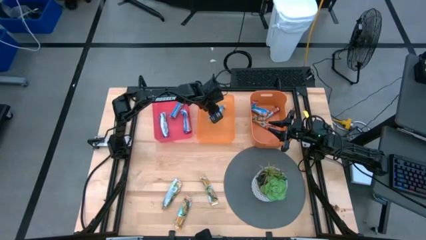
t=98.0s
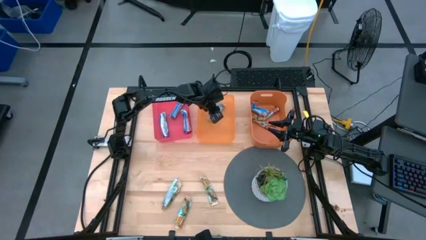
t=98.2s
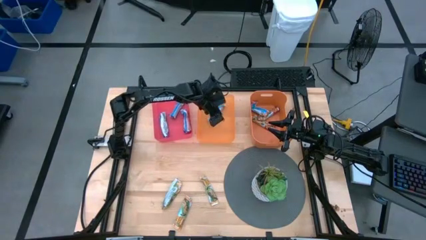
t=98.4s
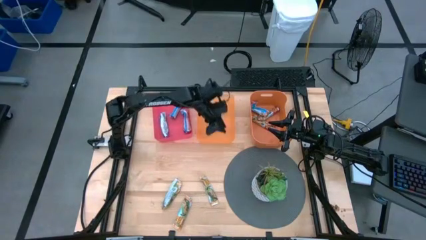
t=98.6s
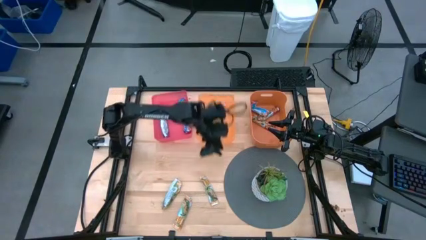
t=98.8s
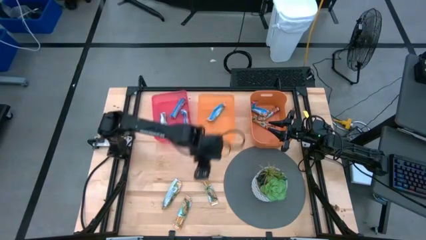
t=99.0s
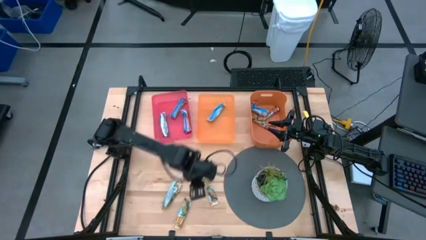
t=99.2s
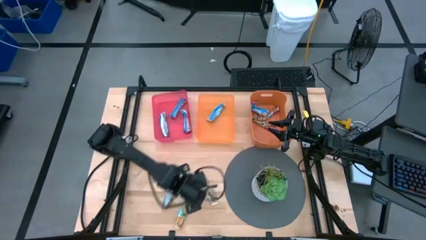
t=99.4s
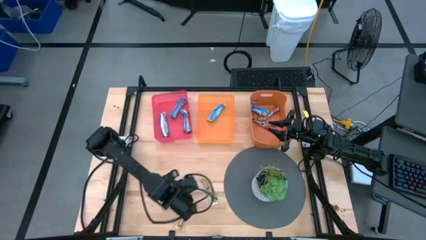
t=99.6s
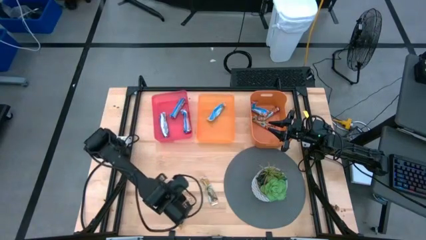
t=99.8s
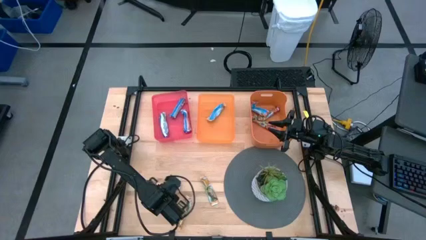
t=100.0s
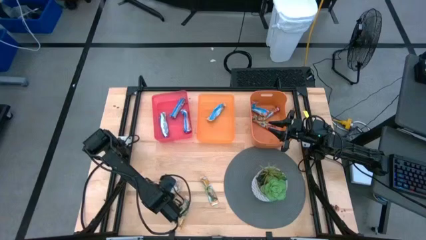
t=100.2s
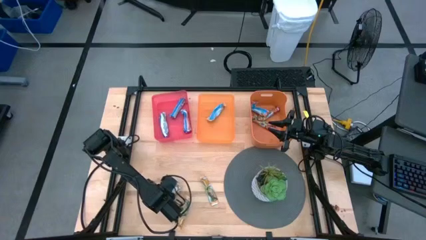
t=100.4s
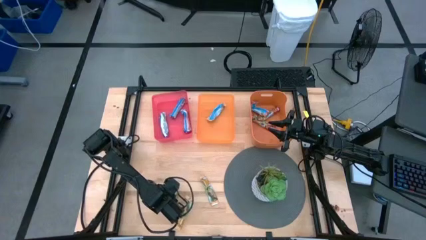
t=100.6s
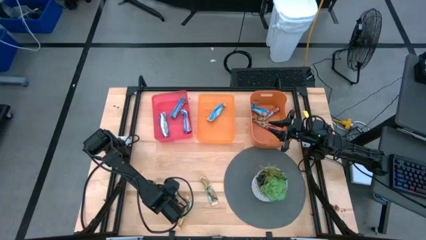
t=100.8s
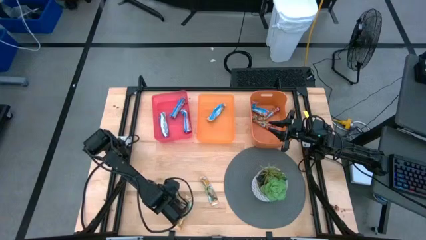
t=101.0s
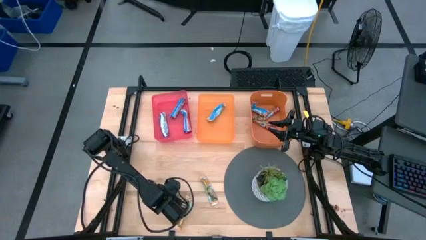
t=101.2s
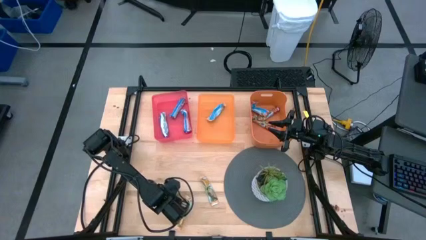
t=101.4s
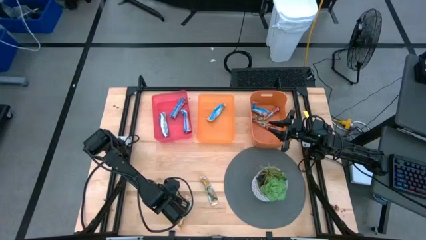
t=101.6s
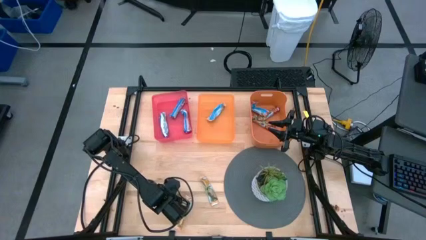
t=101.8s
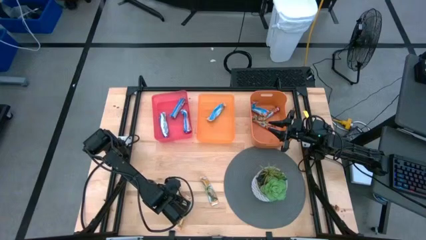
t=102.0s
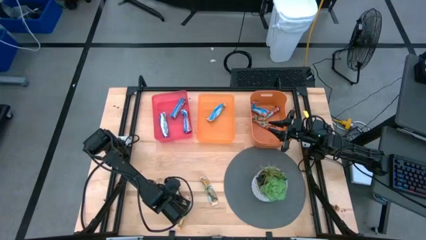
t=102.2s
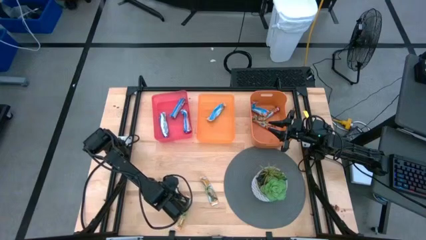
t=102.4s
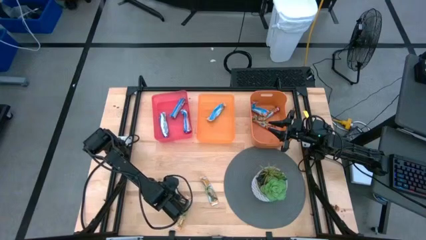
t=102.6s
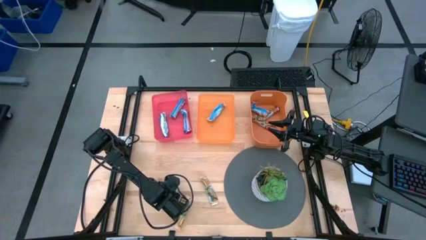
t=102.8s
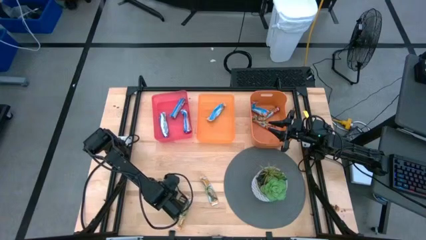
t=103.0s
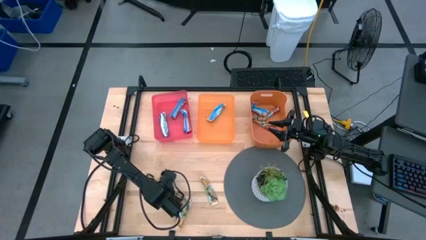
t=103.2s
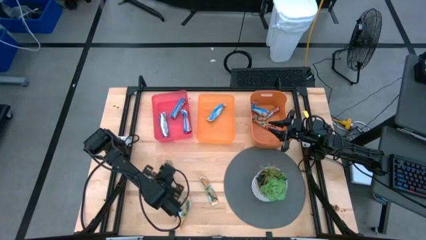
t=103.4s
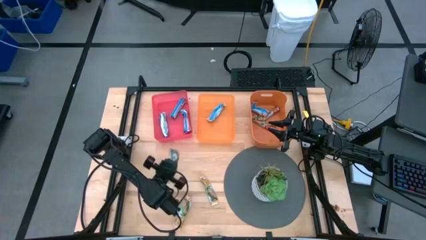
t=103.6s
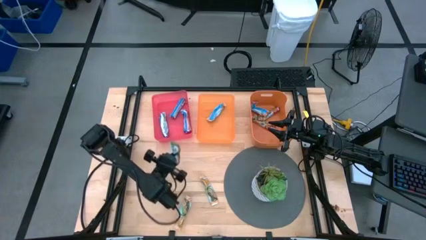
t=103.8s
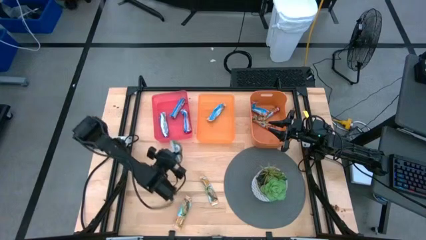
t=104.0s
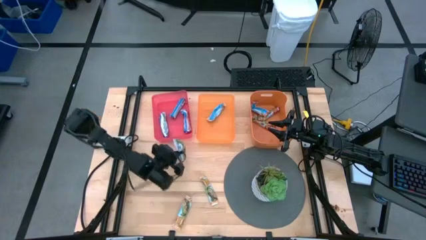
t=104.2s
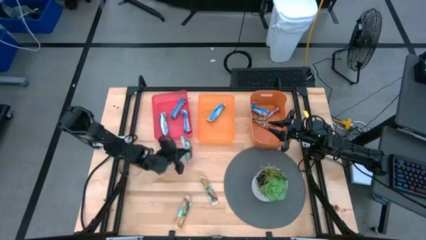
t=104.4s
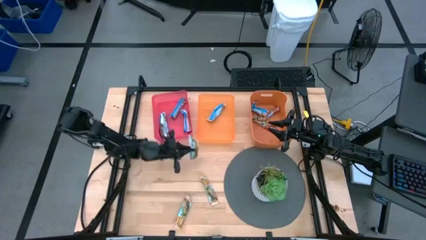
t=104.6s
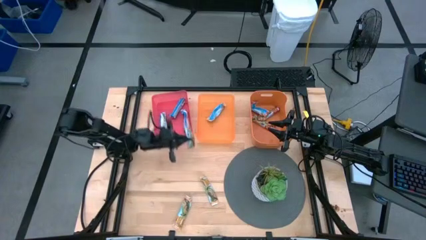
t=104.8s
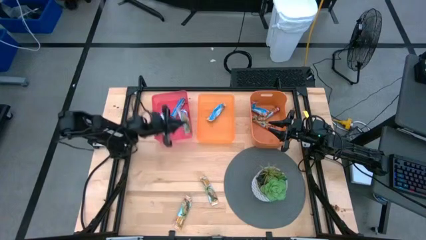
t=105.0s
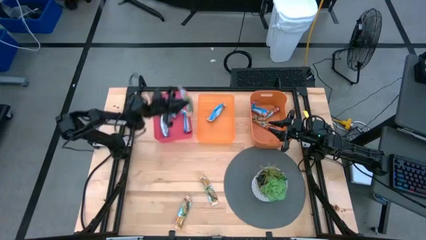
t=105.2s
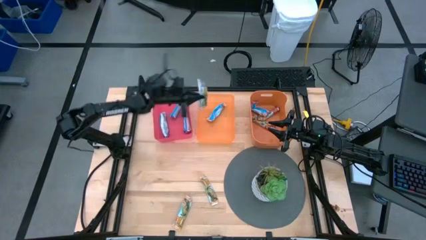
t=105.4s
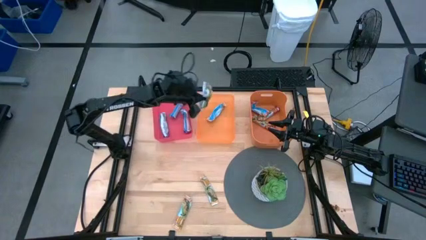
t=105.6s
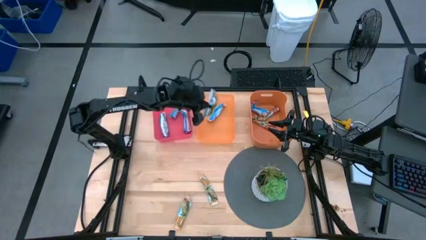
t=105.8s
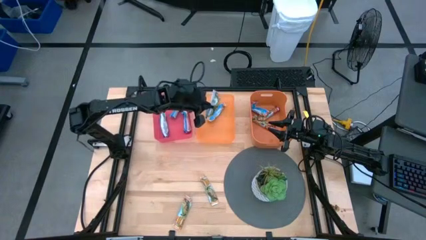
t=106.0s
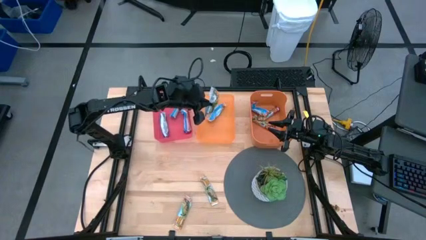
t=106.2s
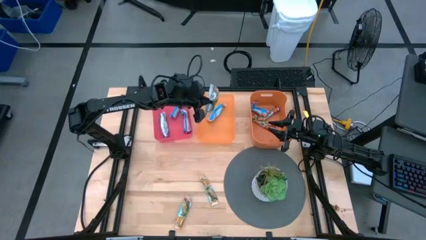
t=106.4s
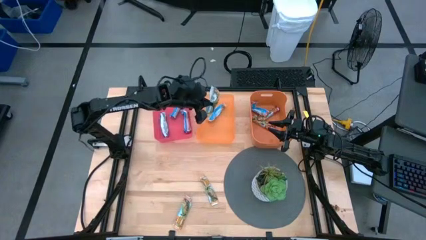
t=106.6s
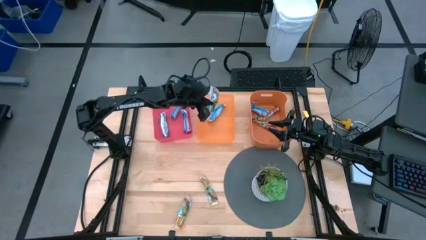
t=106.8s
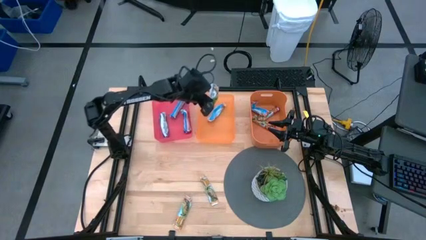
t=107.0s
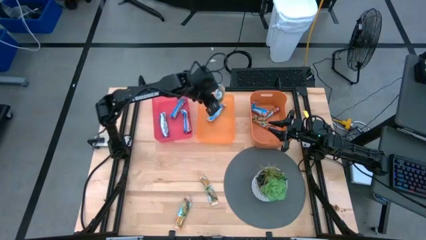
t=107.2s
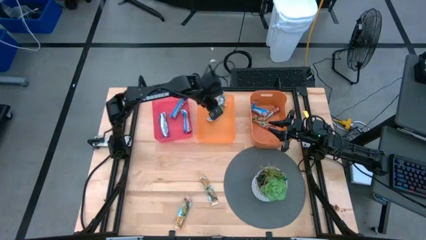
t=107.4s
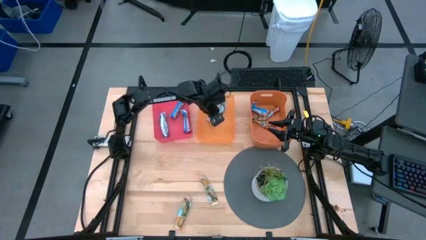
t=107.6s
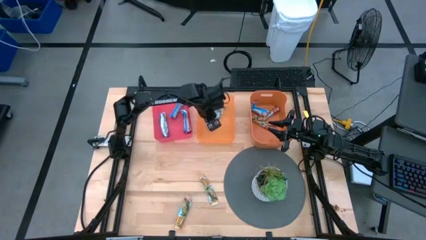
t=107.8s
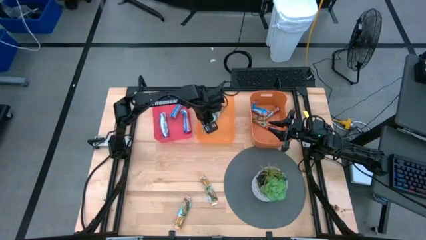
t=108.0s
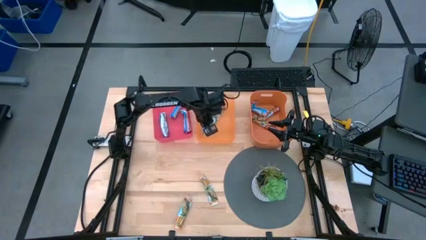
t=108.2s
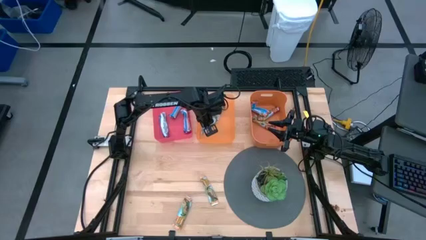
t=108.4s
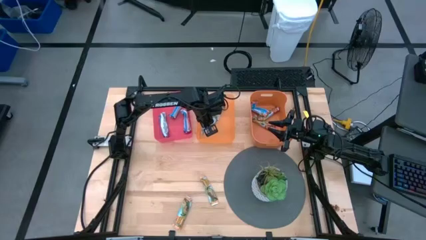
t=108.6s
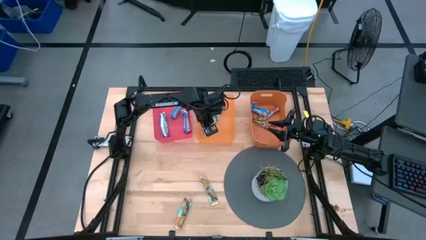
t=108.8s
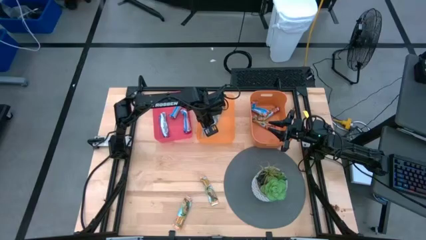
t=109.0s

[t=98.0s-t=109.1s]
Task: Pick and place Granola Bars by type
Put the top left yellow granola bar into the left orange bin

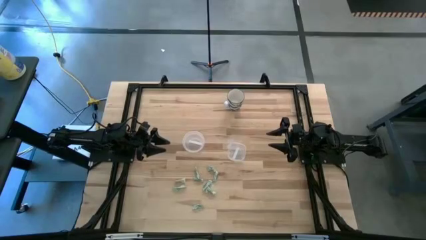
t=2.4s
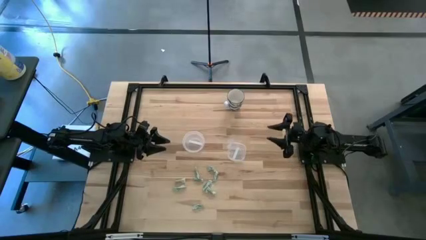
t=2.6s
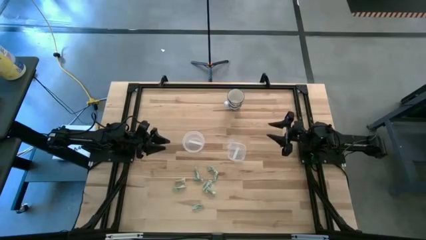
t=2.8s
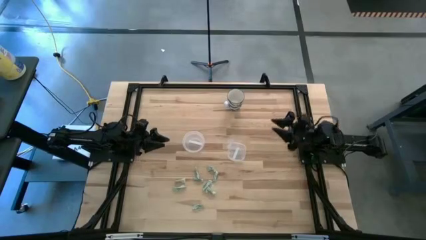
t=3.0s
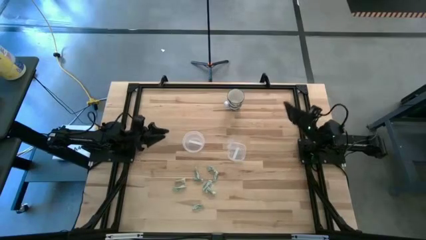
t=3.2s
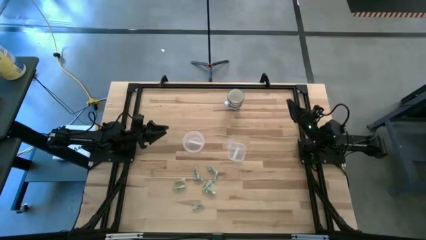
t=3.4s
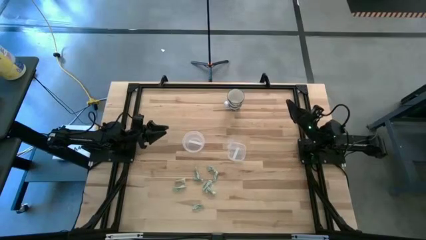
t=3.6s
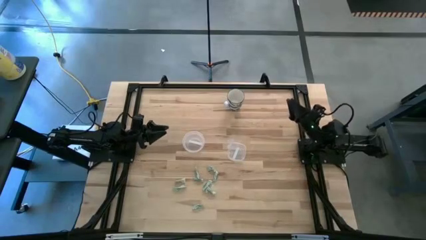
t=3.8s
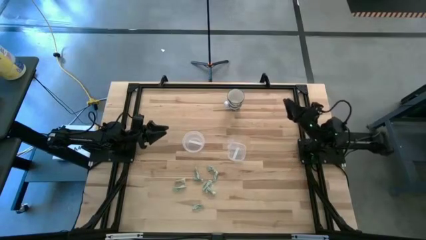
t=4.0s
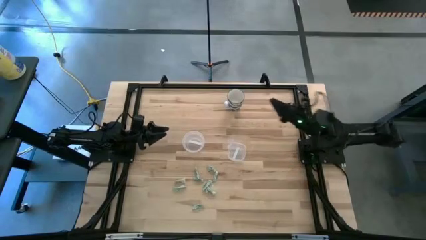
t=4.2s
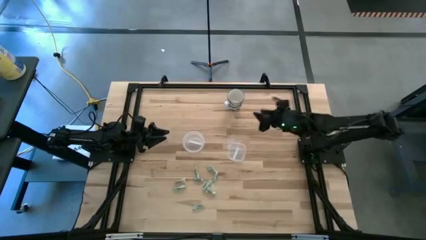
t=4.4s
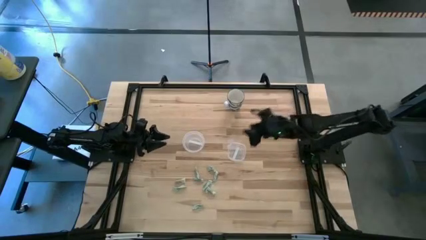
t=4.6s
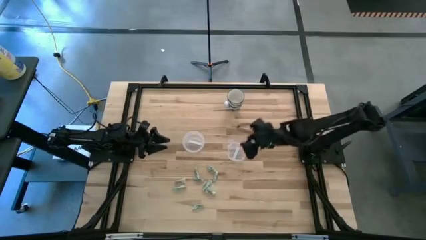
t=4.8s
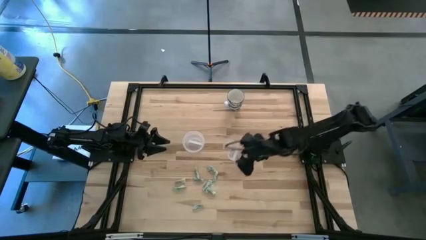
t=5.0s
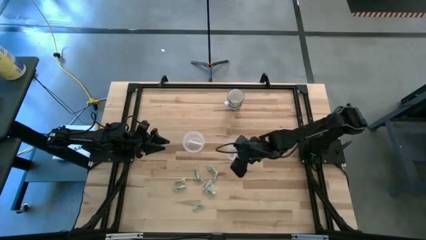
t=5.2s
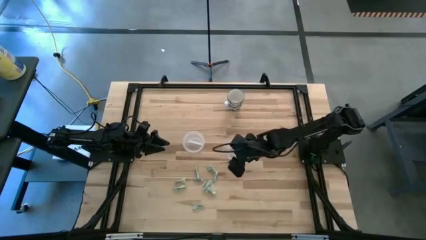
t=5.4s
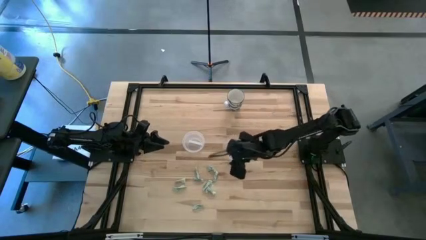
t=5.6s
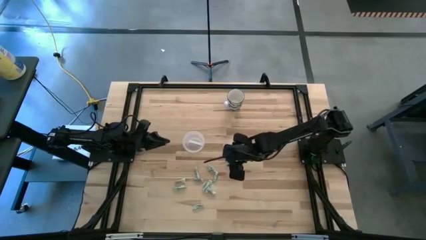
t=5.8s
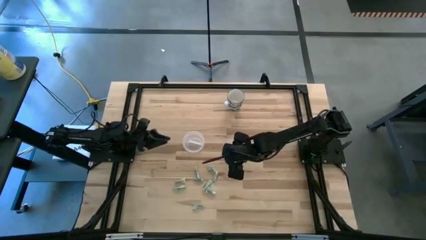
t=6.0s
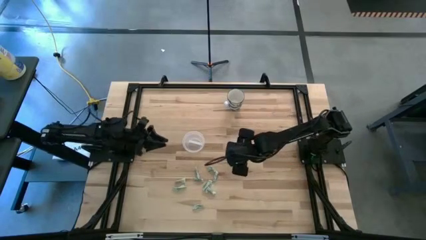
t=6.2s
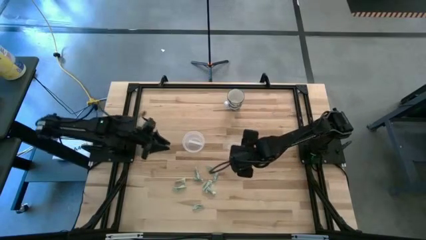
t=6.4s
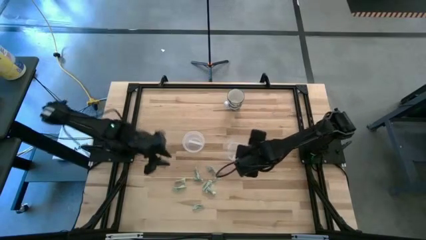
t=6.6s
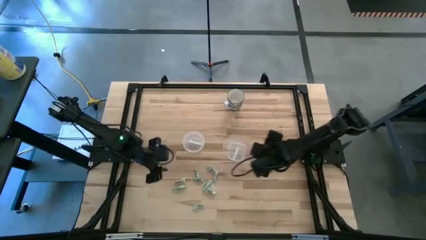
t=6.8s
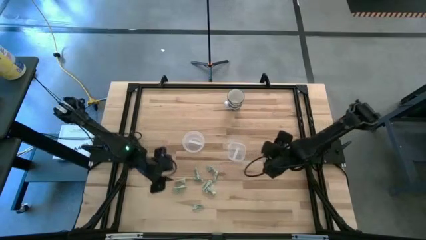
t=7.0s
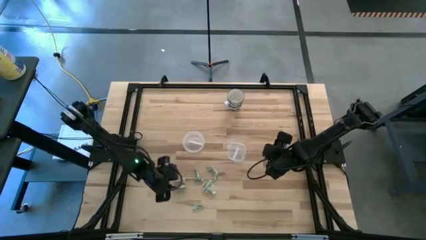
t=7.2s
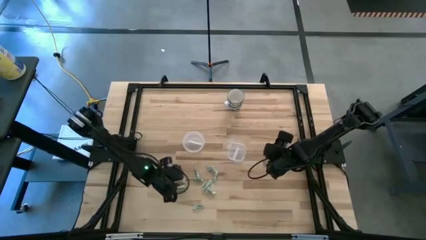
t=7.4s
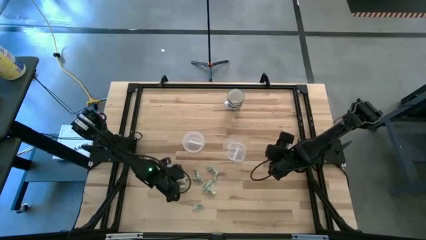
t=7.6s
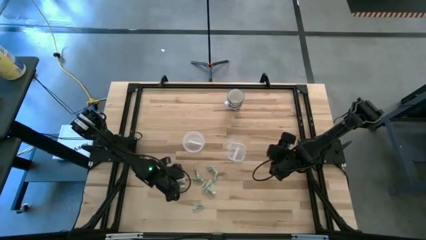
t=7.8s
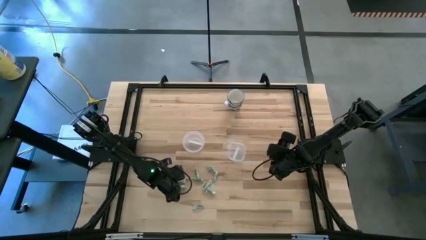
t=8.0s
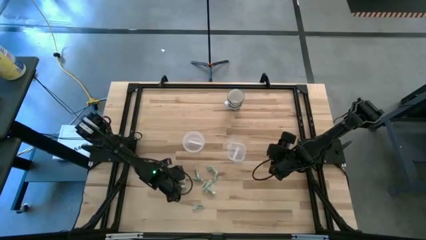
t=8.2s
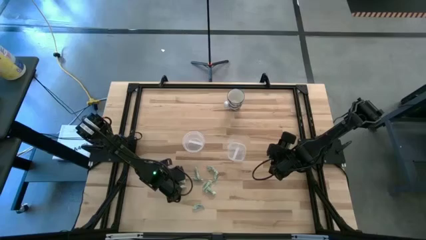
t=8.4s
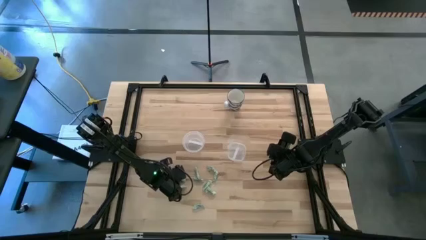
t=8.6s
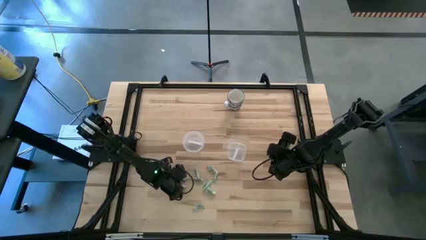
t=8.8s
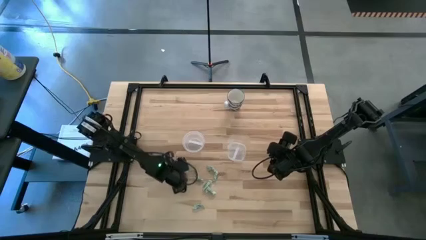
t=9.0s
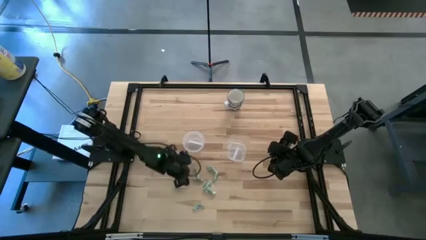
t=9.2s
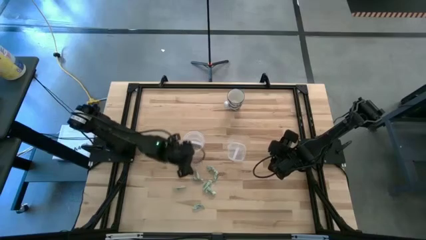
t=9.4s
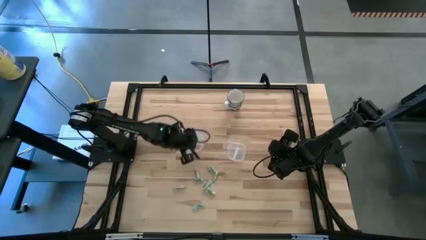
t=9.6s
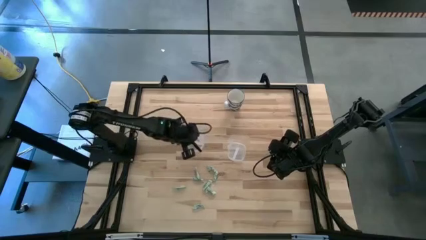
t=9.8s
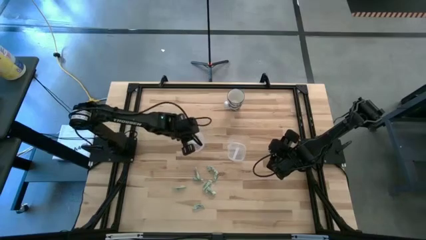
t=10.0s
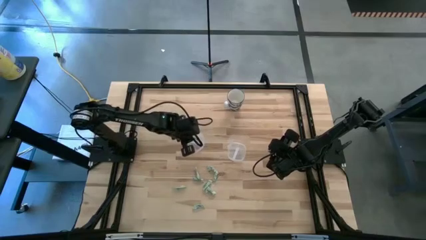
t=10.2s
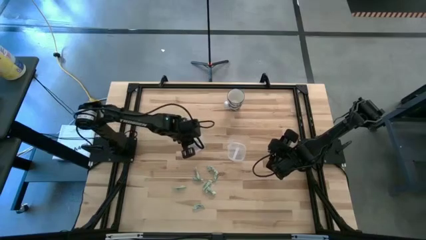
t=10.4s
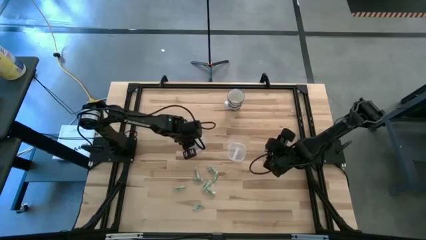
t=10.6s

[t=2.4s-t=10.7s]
Task: Pick and place Stevia / Truvia into bins
Put the green stevia packet into the left transparent container
